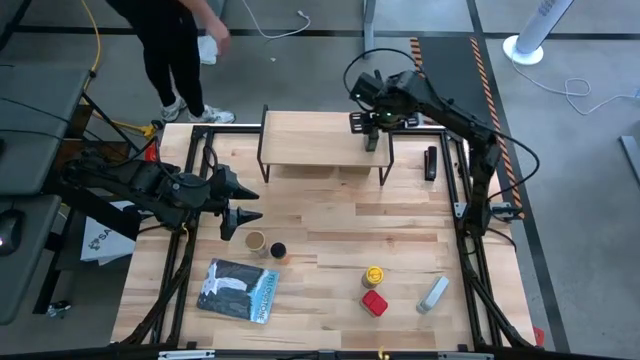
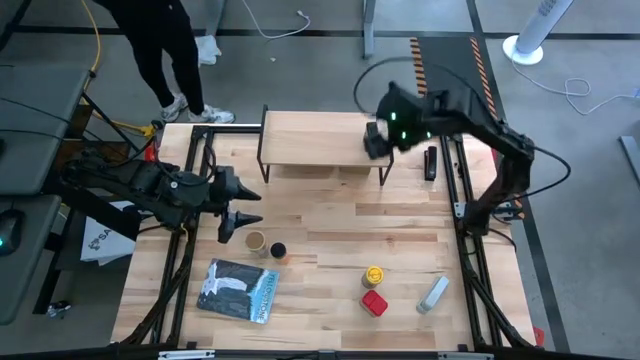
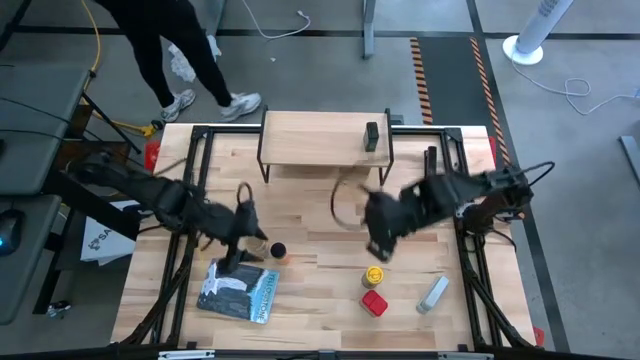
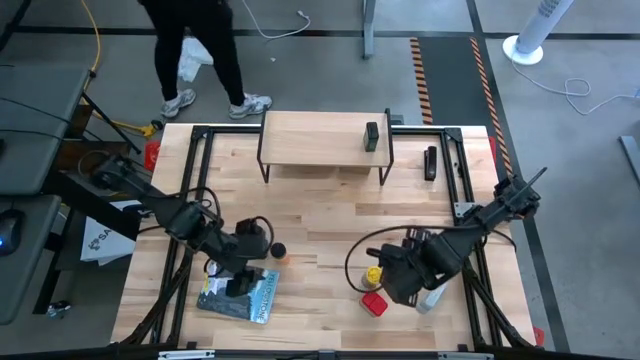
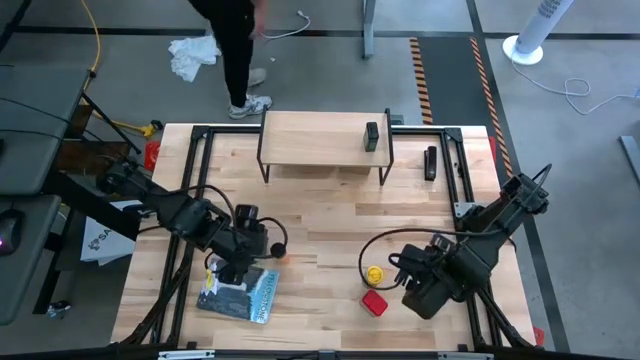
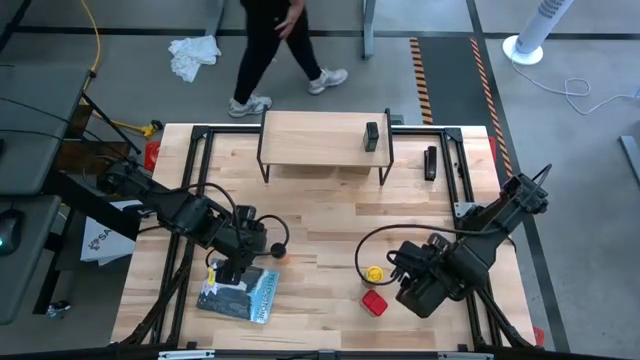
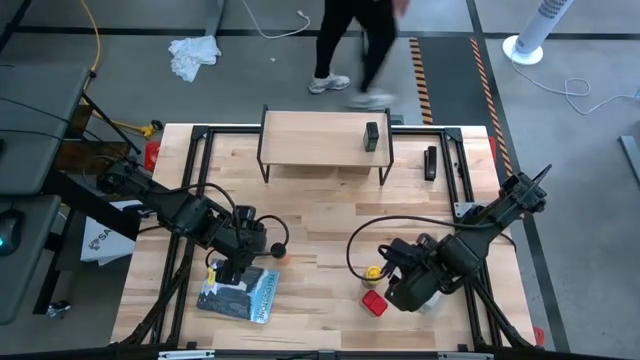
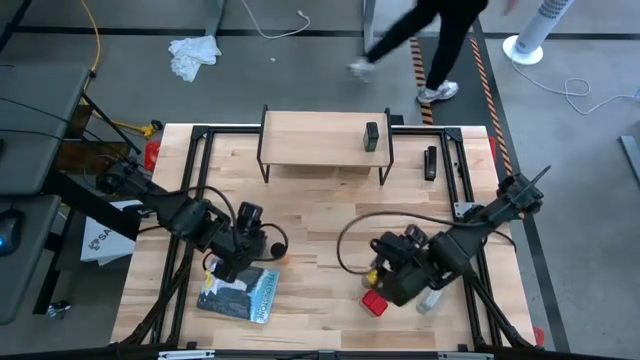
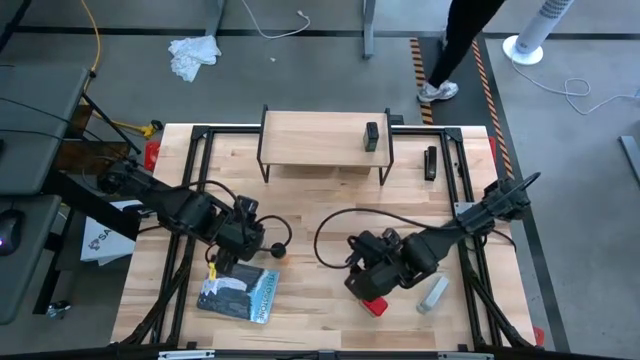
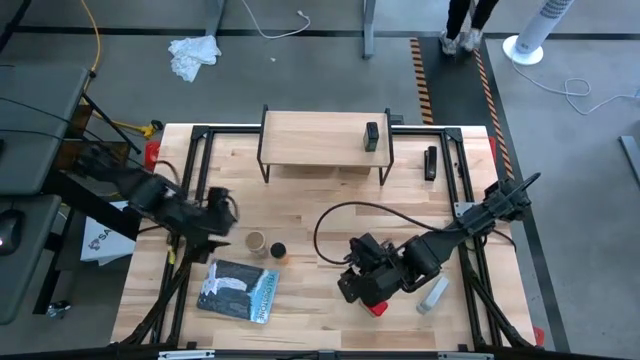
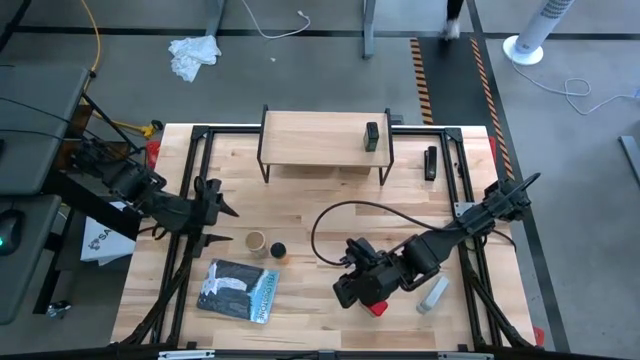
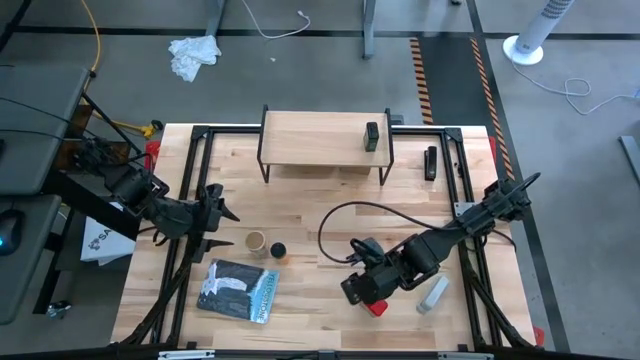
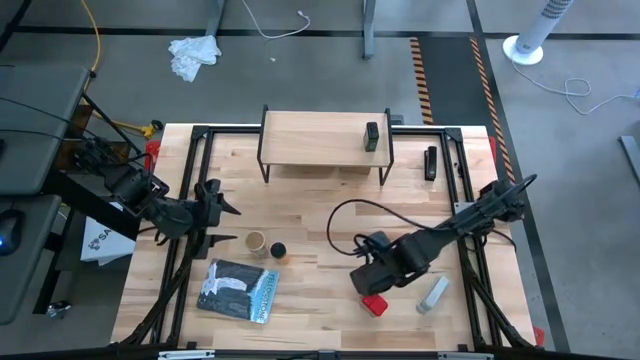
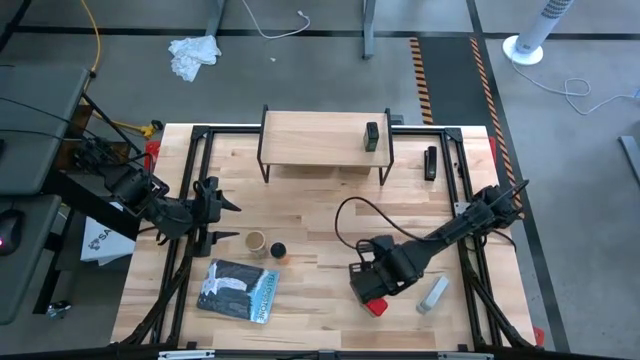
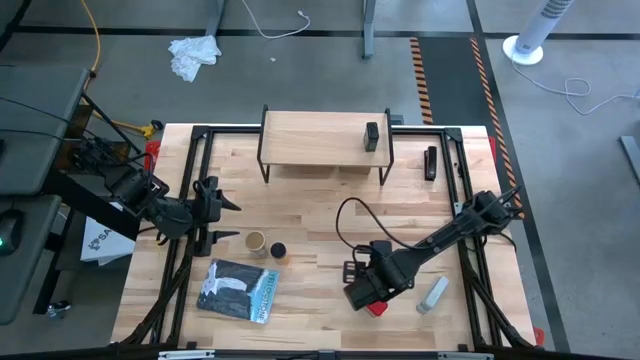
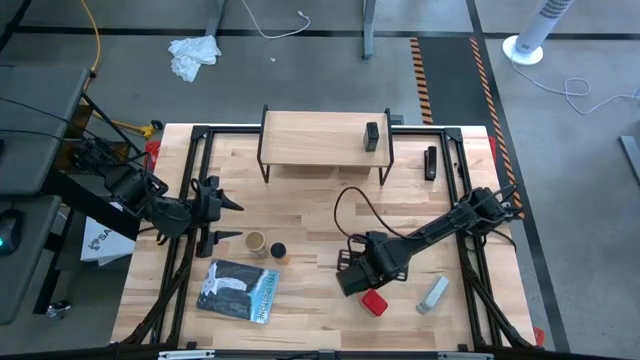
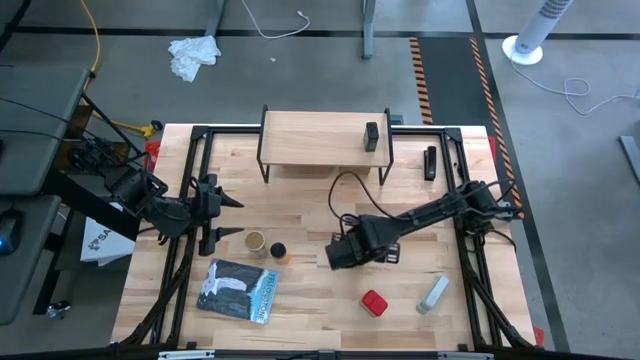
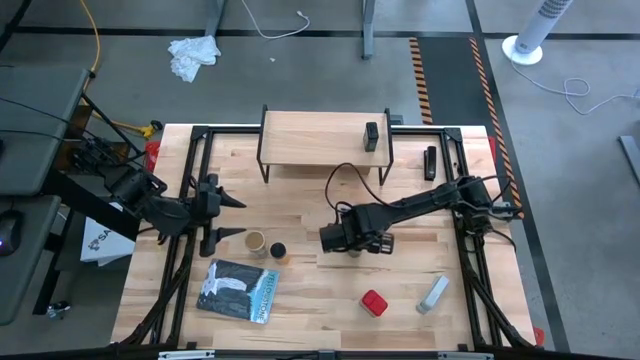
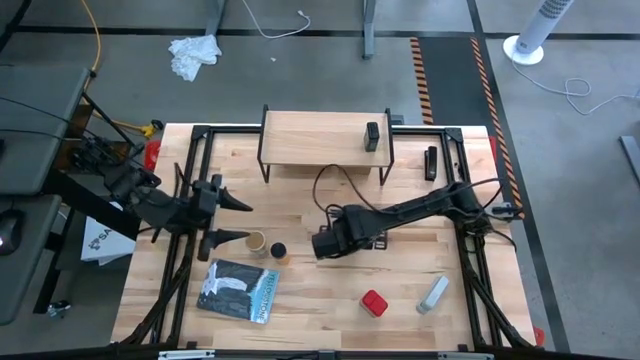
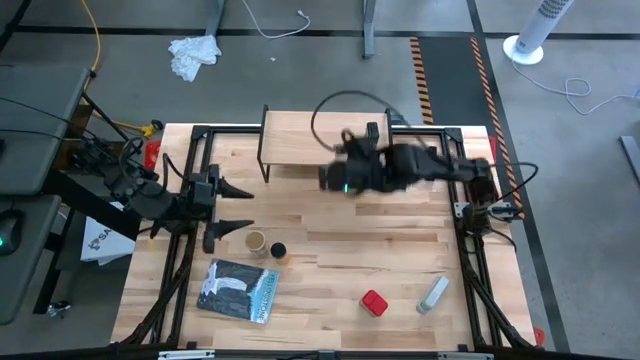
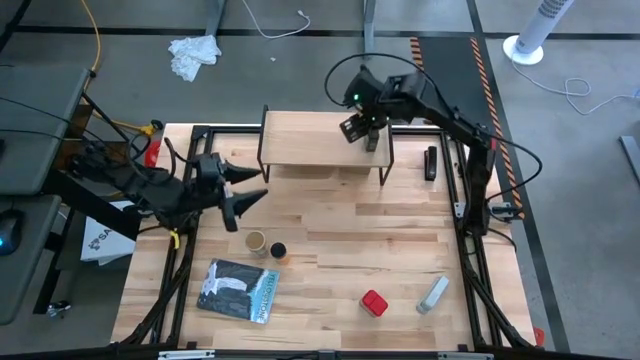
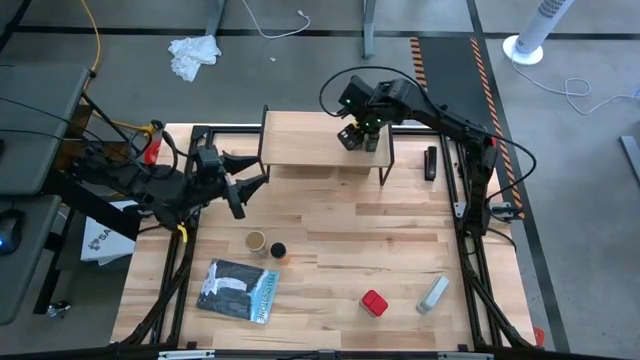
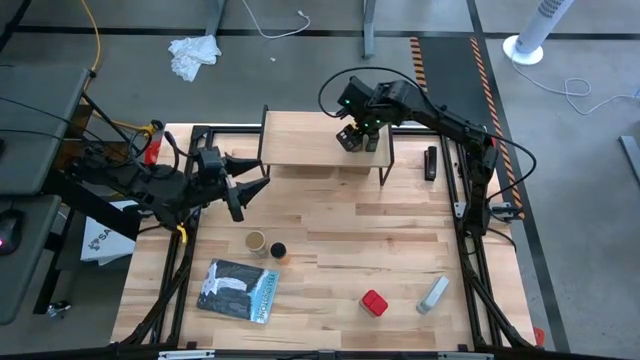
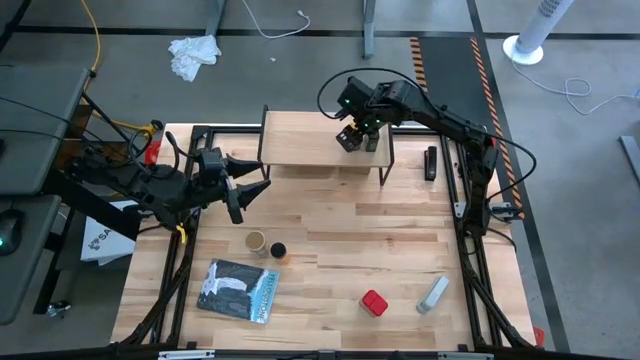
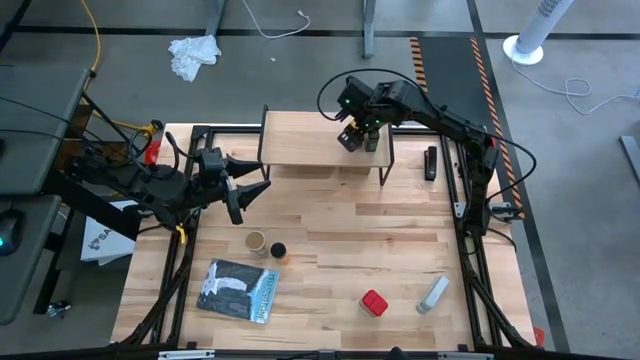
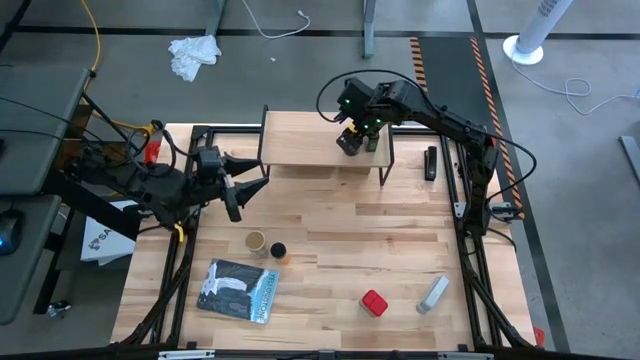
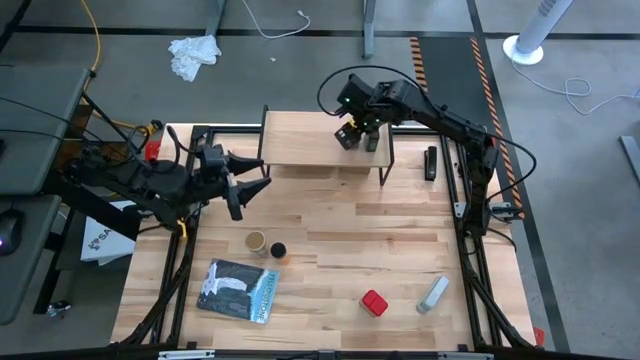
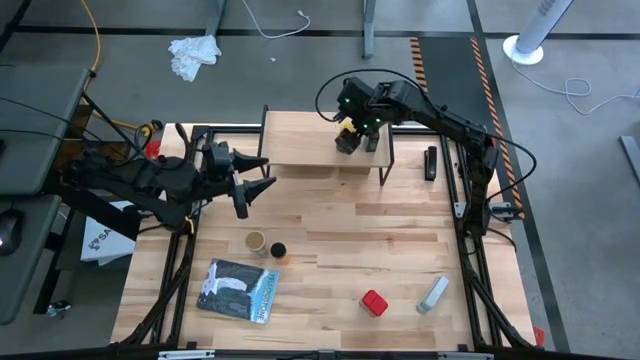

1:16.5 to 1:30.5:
Task: Shelf spices
Put the yellow seasoning bottle on the shelf

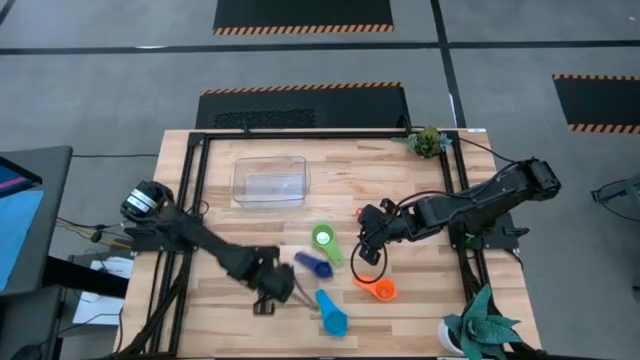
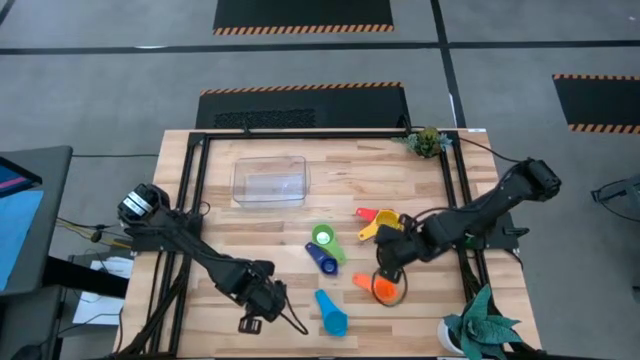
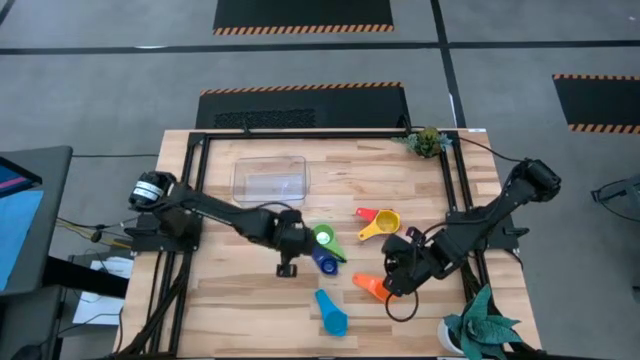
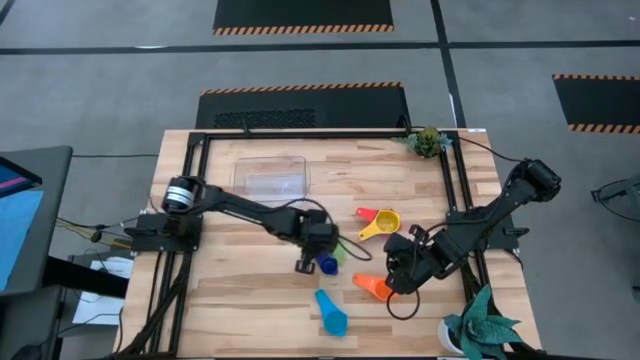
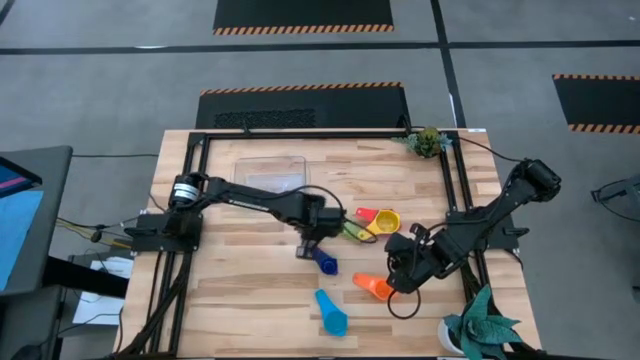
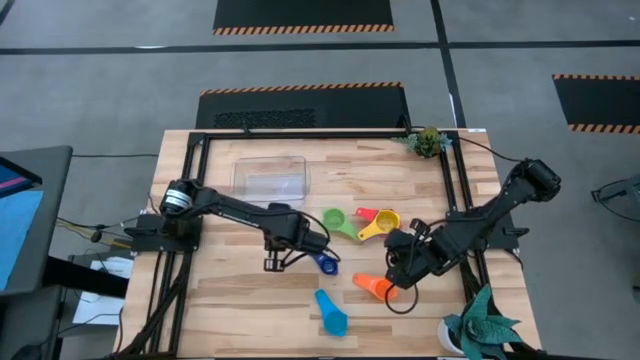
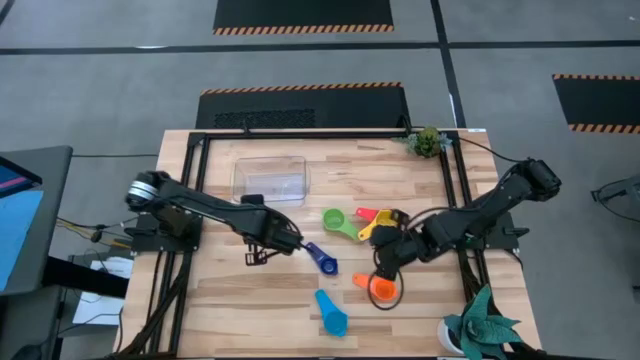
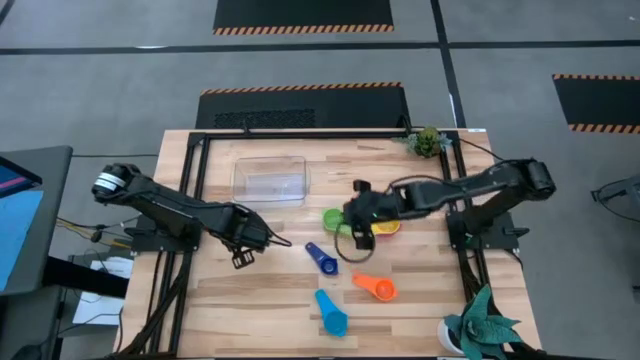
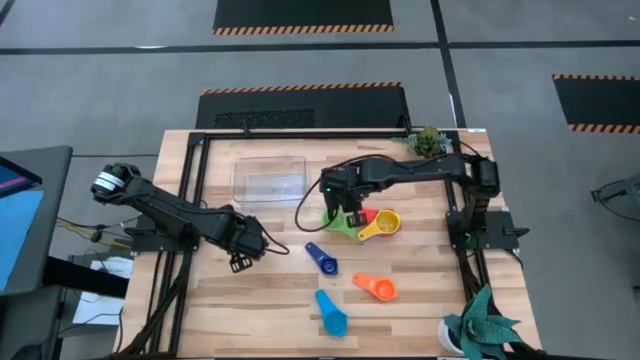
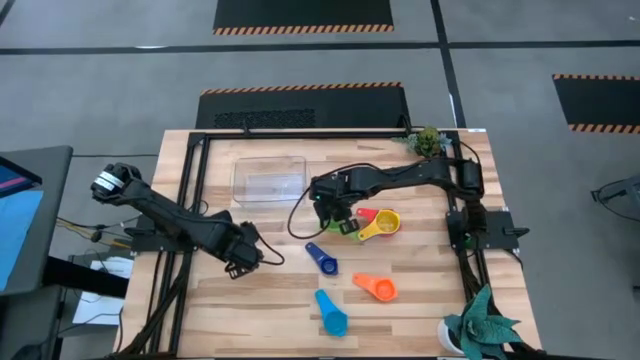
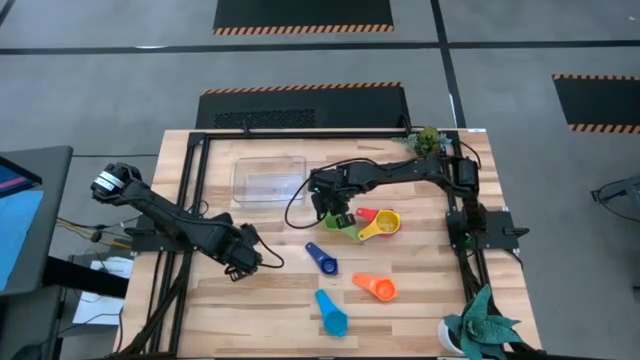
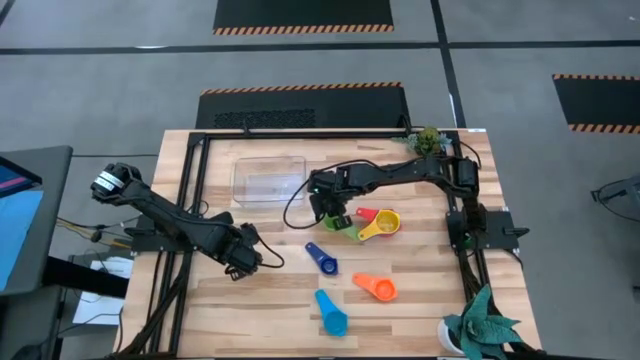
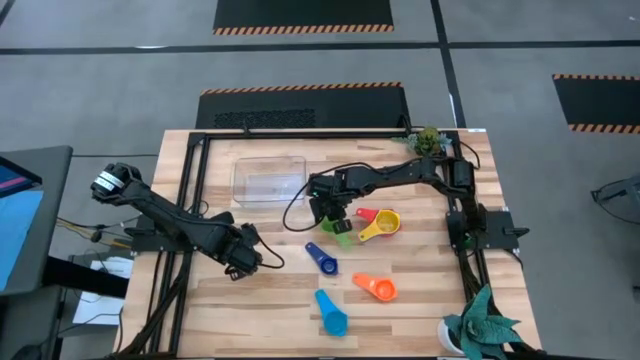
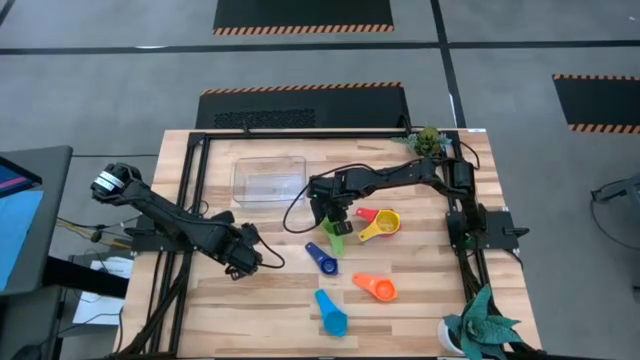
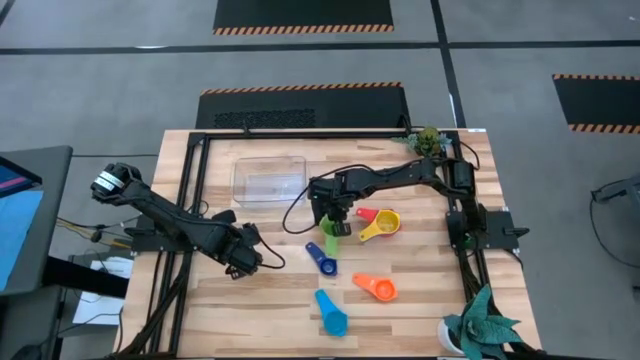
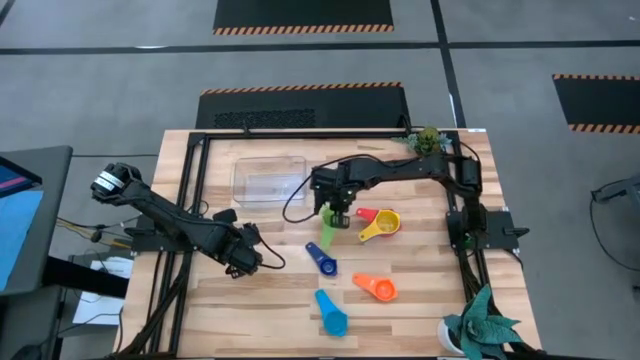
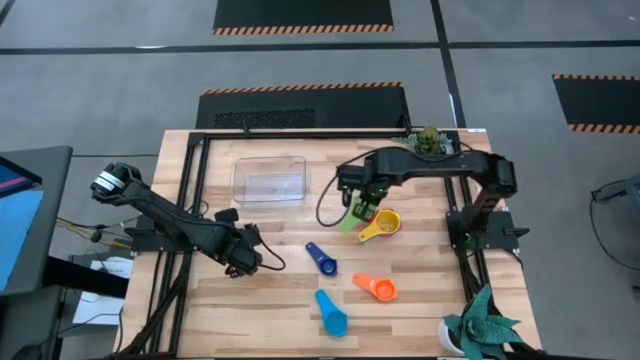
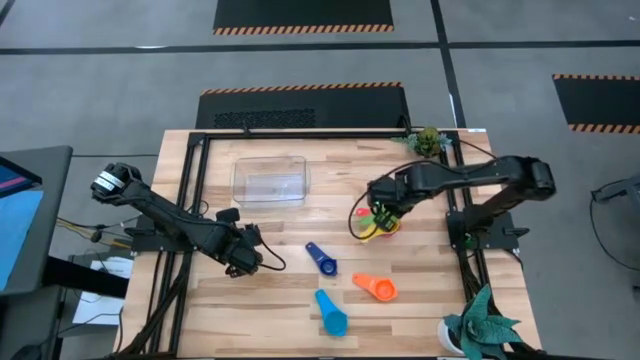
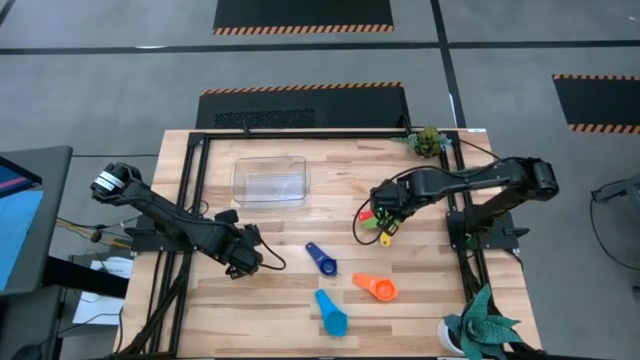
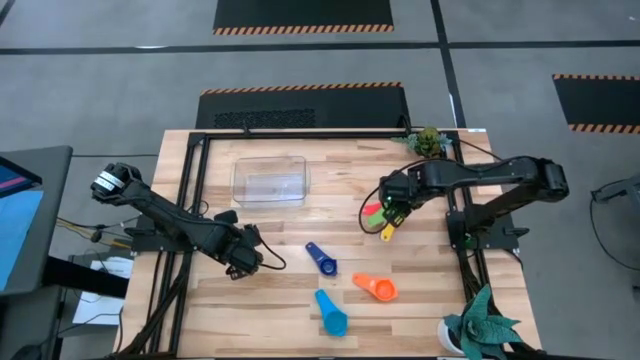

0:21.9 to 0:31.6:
Task: Nest measuring cups in basket
Stack the green measuring cup on top of the yellow measuring cup
